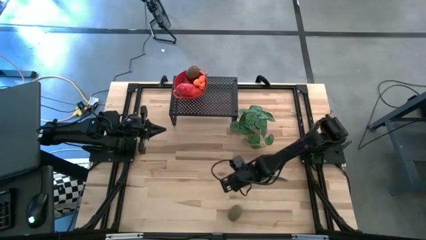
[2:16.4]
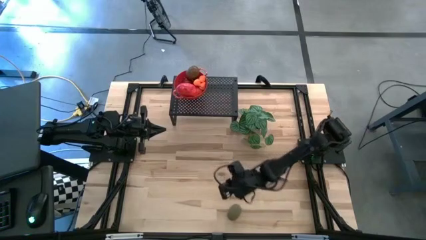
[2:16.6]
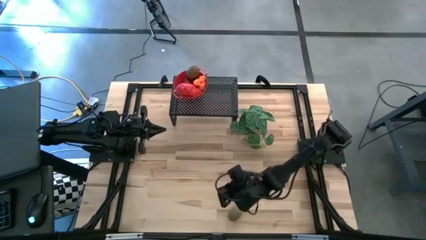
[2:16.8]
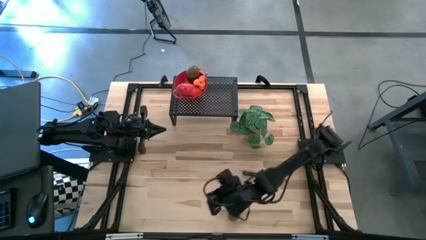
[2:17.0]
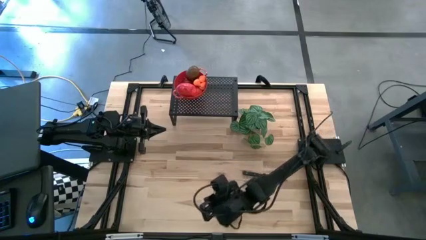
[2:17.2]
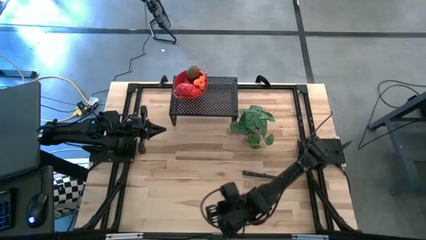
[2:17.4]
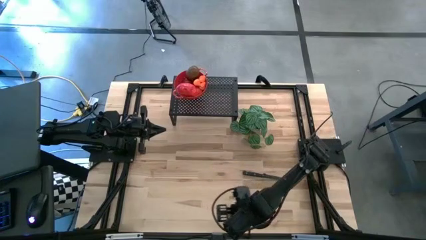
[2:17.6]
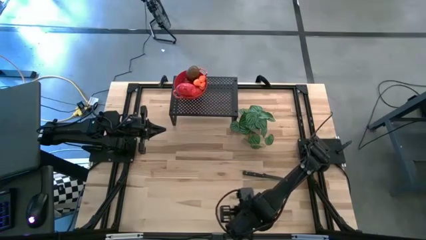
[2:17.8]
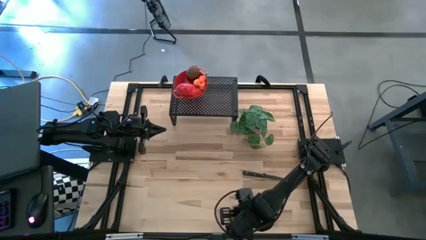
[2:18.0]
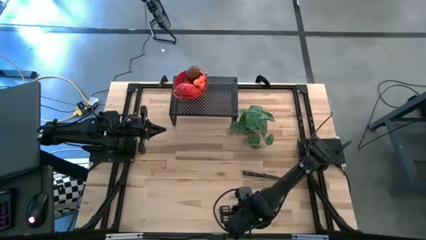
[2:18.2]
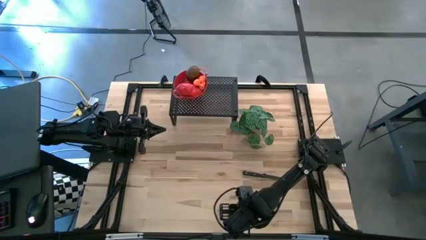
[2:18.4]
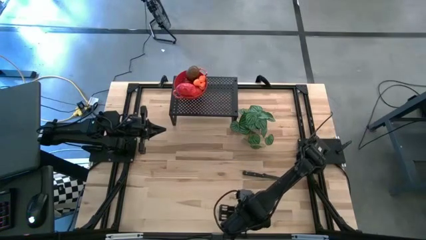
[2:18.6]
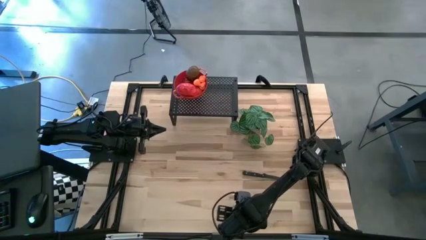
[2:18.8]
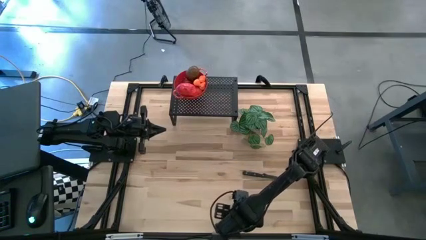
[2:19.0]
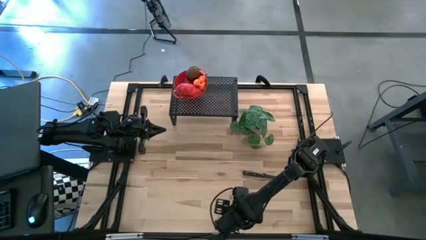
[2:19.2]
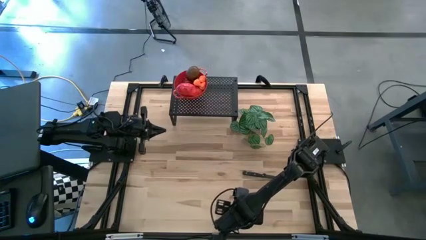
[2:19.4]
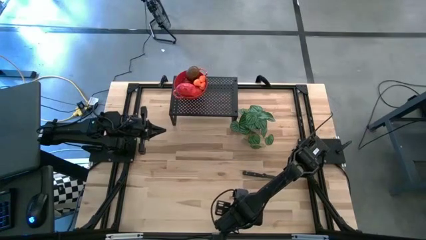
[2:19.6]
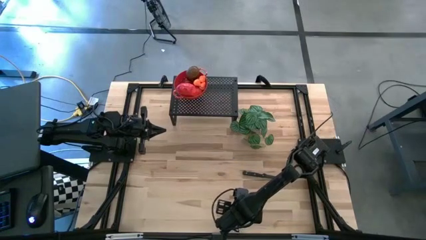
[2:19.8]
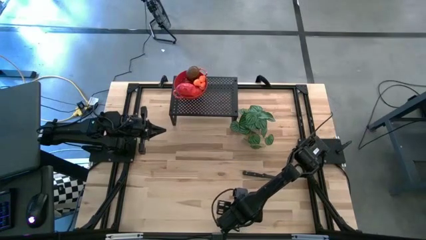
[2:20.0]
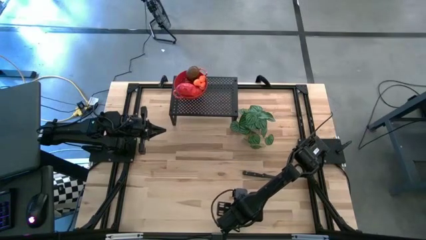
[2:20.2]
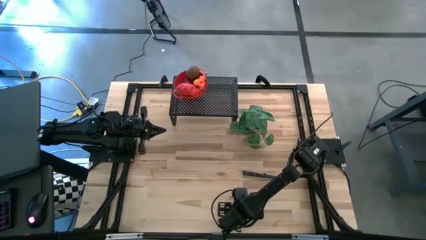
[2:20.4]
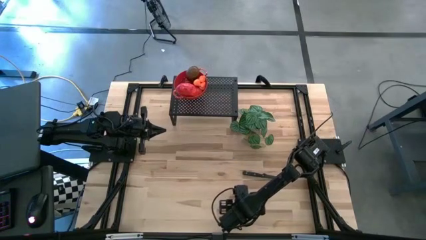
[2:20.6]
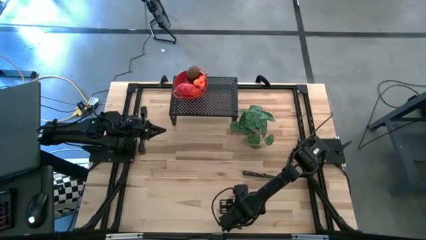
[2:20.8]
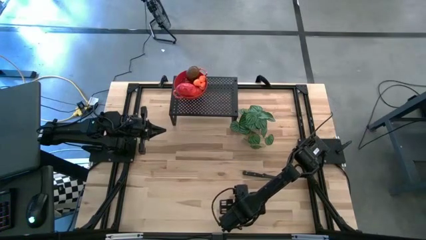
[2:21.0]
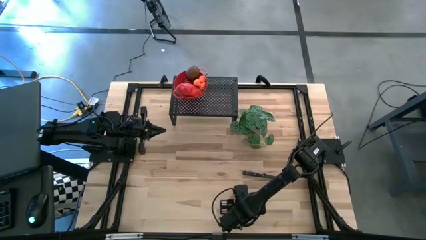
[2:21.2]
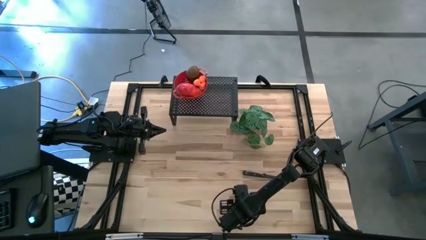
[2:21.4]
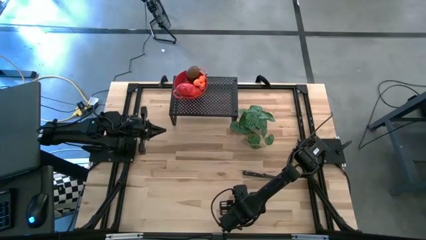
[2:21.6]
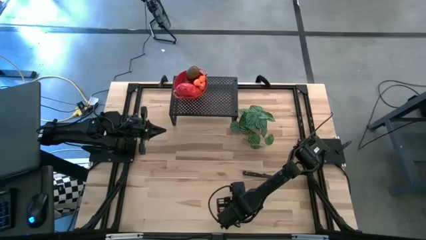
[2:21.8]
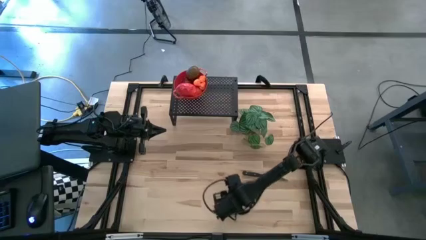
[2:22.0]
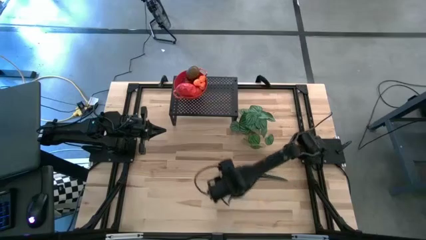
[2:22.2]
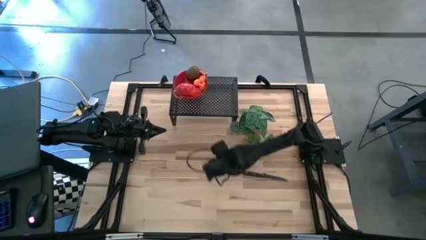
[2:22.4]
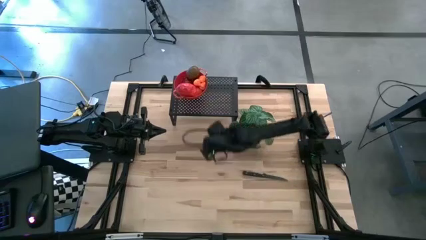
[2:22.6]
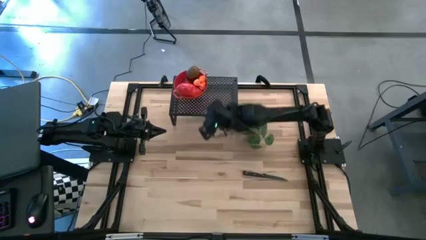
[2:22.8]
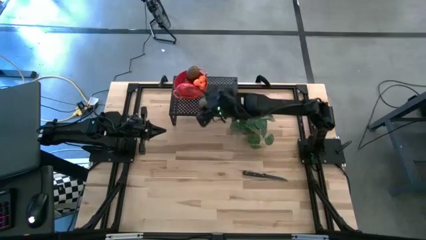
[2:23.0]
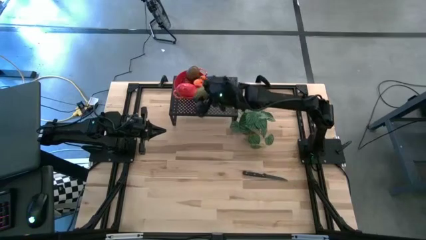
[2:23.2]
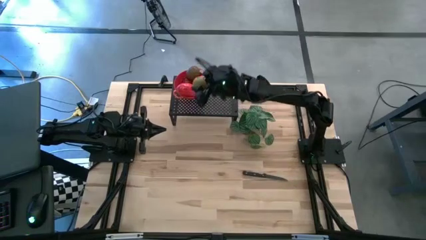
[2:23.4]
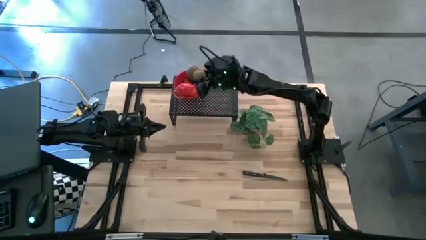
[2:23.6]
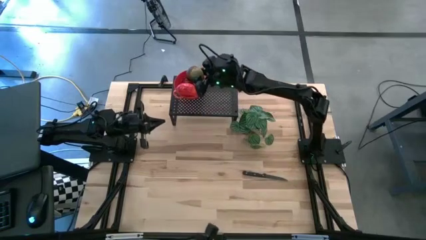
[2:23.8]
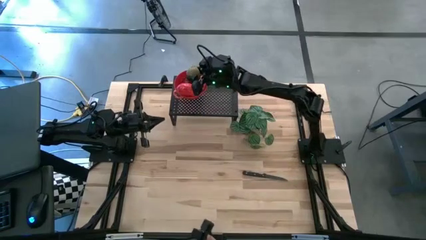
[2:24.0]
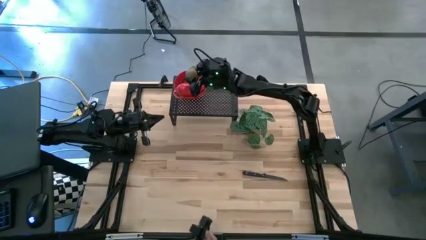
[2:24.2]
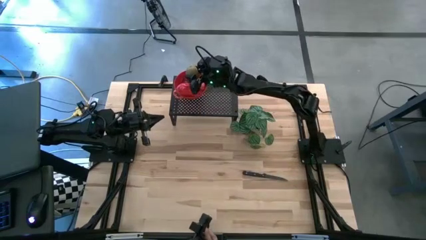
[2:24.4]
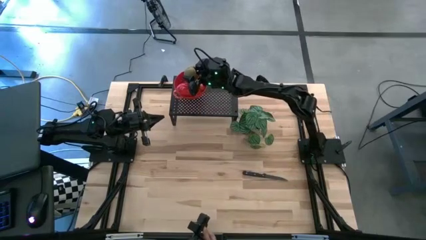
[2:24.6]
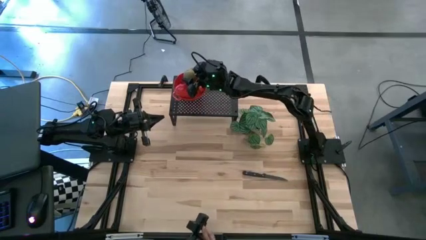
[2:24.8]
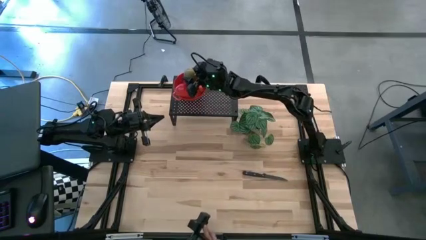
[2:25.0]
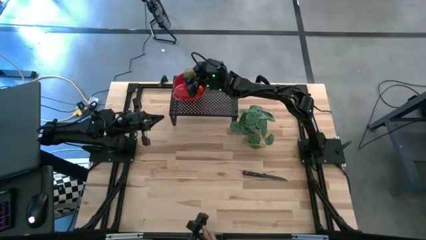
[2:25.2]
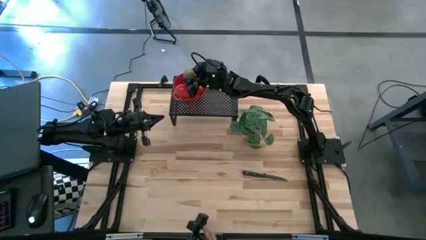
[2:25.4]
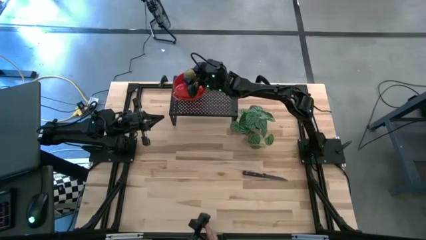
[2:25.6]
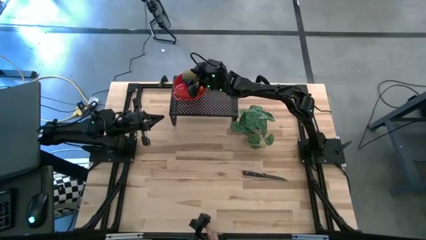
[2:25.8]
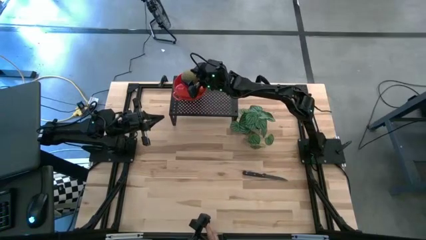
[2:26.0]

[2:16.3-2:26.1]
Task: Pick & Place Fruit
Put the brown kiwi in the red strainer bowl on the shelf

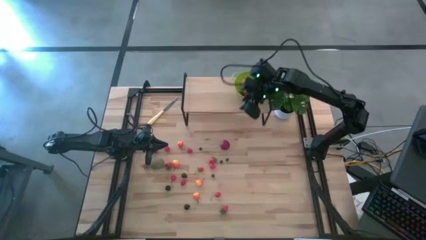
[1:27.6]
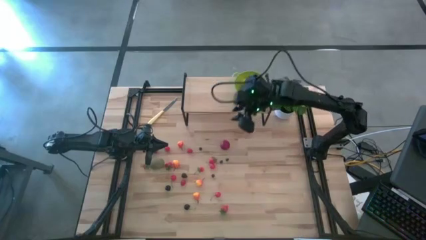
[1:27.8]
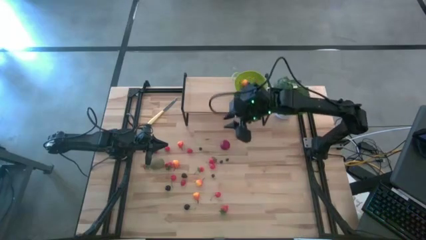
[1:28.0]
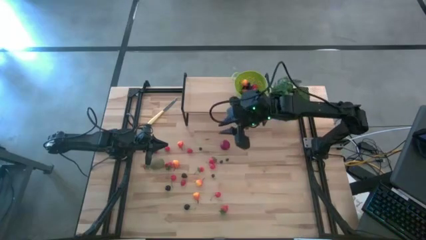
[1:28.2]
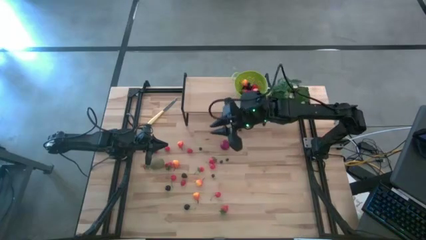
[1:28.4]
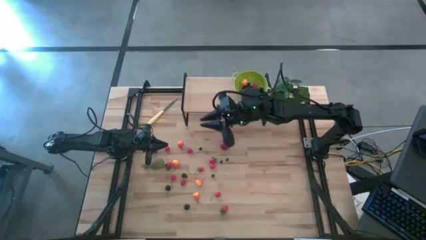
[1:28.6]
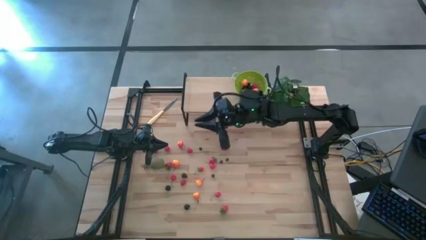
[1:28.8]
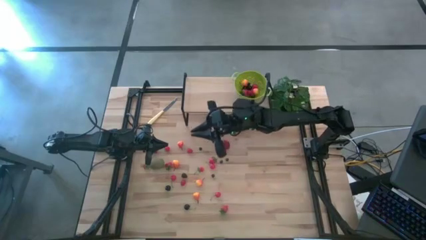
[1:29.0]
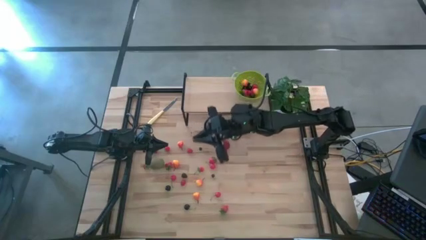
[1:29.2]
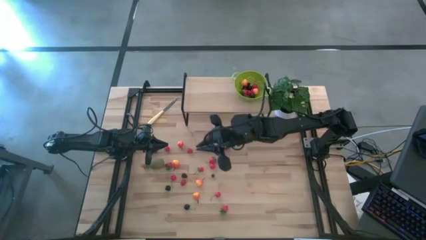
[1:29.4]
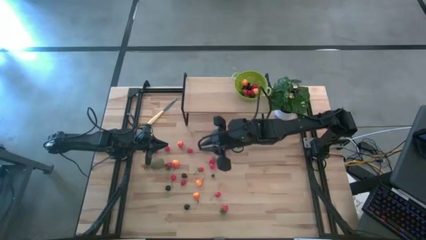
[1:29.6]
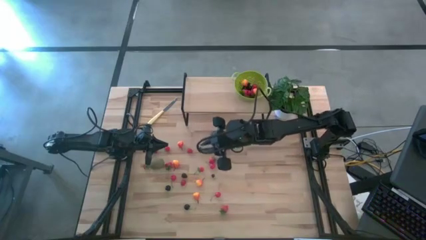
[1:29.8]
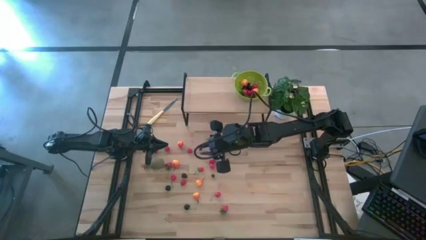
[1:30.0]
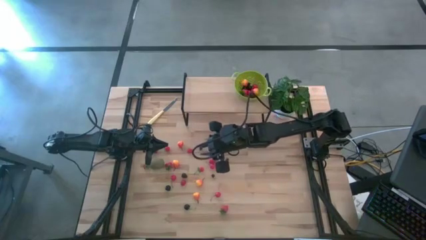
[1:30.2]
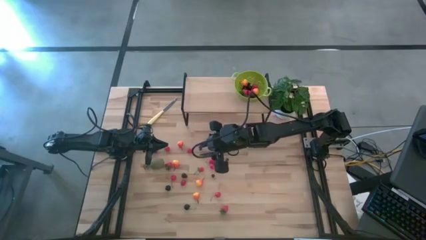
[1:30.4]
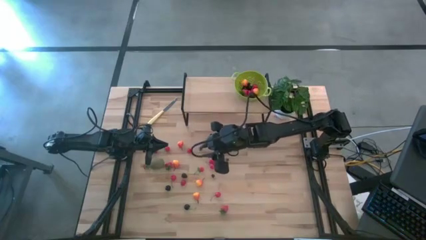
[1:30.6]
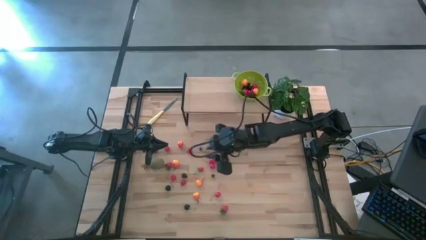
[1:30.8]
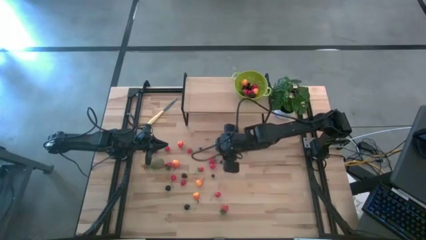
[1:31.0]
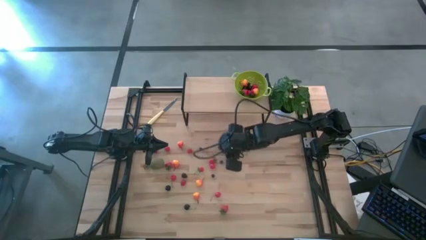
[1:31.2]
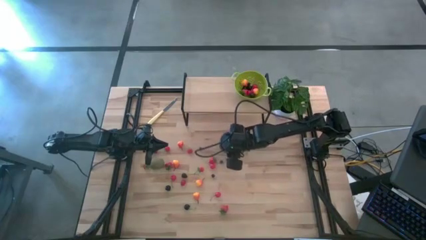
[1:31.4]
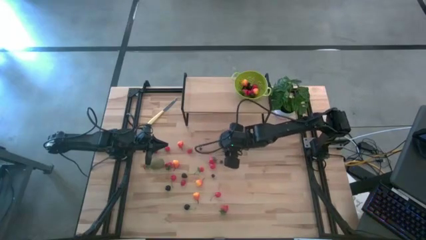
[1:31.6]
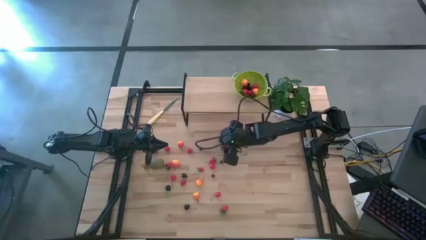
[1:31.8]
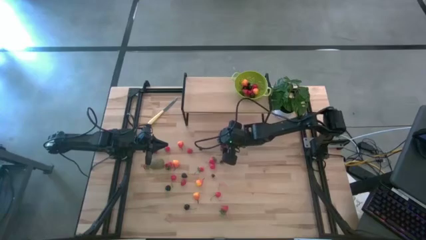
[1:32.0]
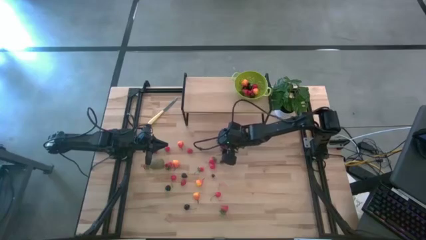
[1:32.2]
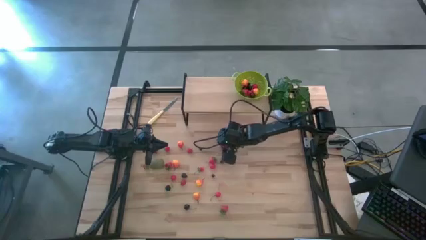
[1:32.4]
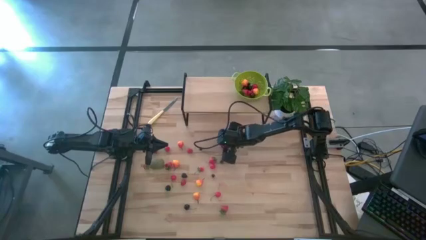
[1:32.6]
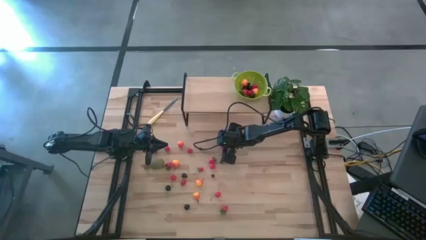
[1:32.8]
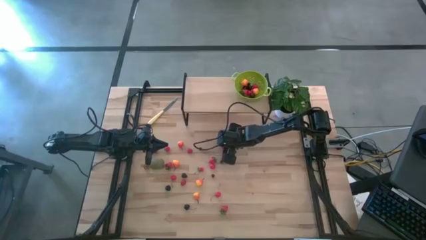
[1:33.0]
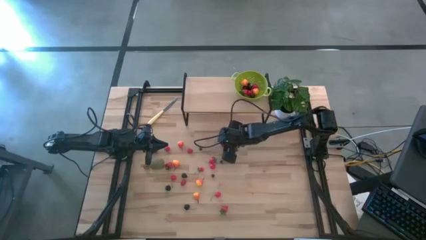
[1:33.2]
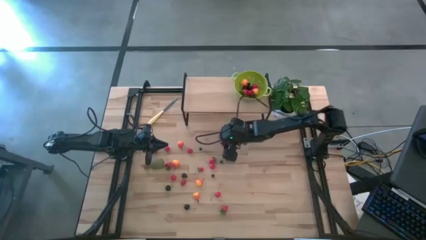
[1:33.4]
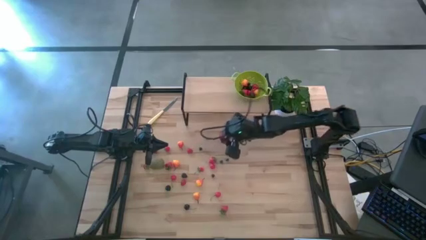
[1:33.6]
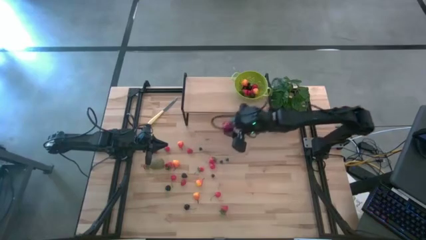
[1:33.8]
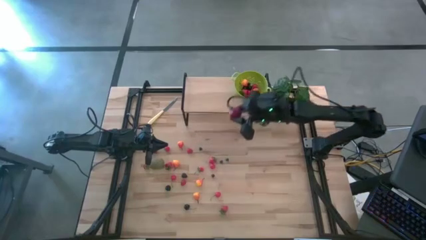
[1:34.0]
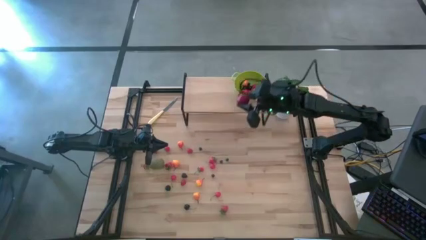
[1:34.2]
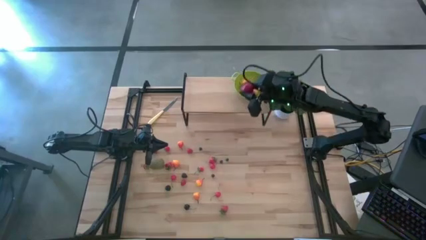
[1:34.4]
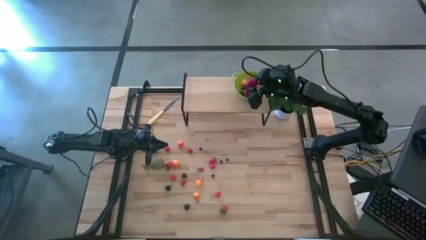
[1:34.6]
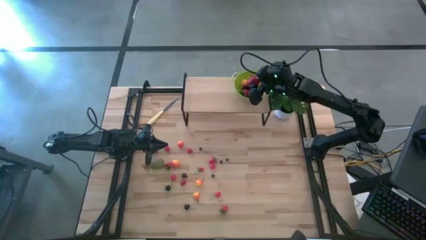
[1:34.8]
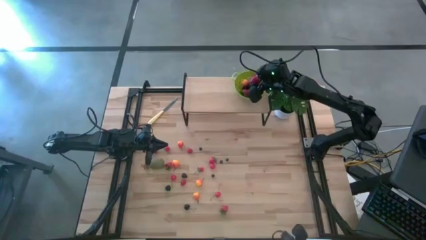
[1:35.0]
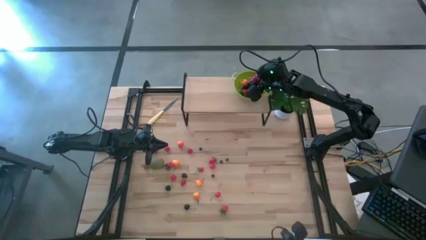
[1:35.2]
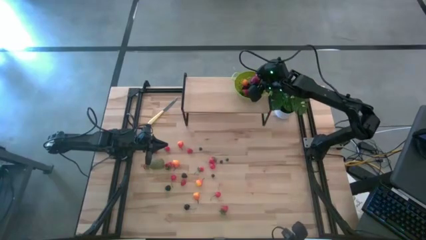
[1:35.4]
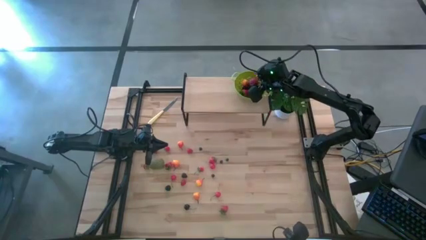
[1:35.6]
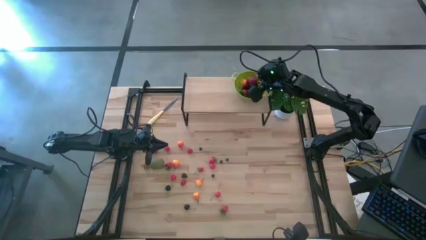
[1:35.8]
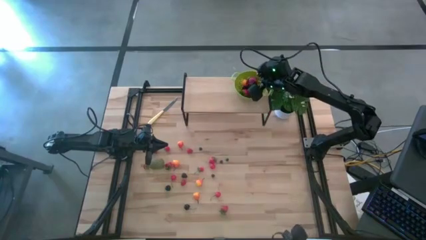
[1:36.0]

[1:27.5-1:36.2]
Task: Build produce basket
Put the pomegranate into the green basket
